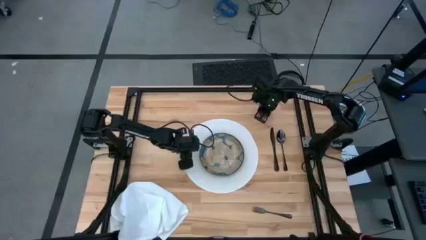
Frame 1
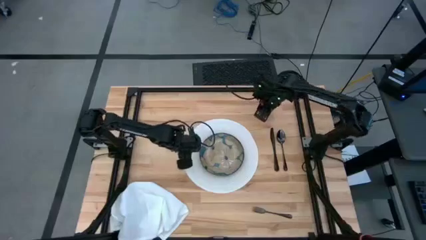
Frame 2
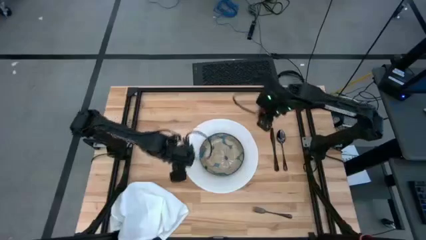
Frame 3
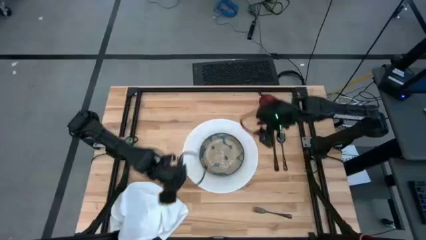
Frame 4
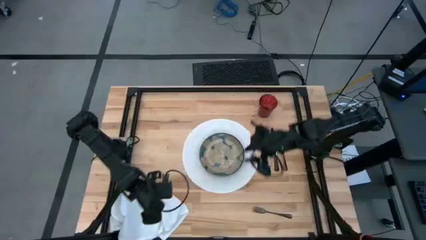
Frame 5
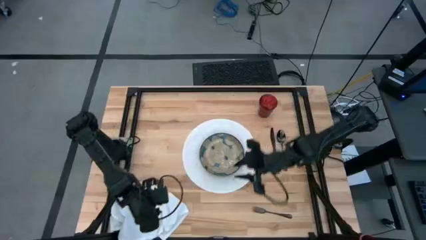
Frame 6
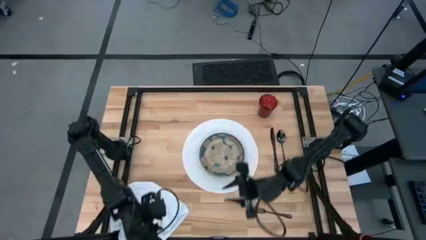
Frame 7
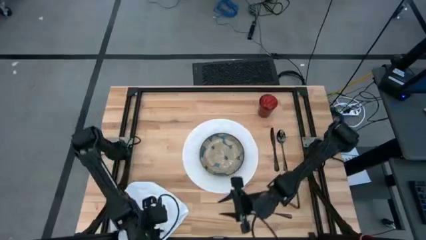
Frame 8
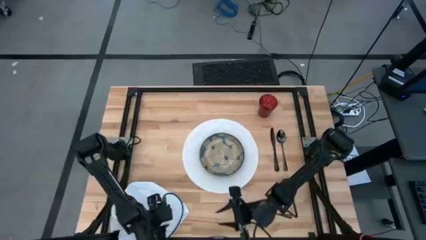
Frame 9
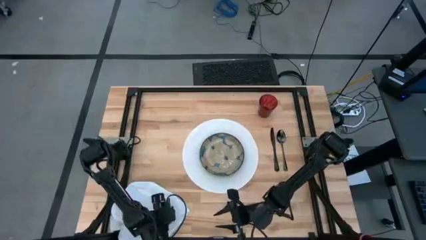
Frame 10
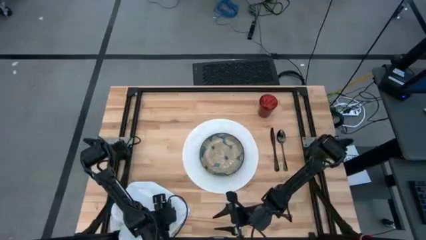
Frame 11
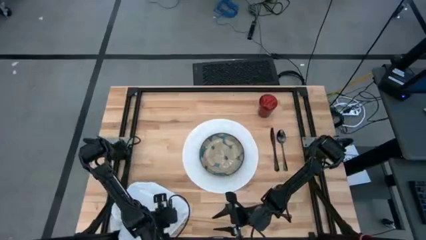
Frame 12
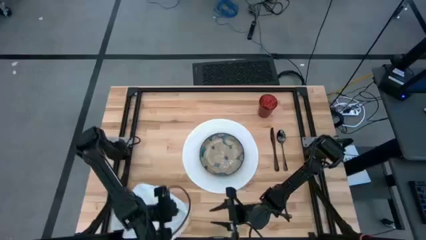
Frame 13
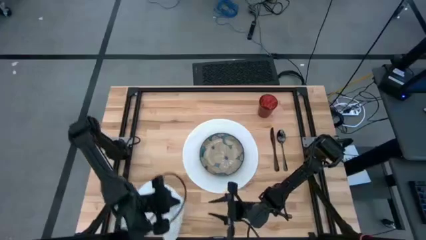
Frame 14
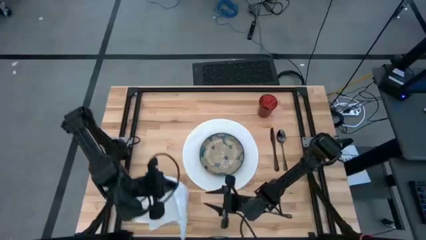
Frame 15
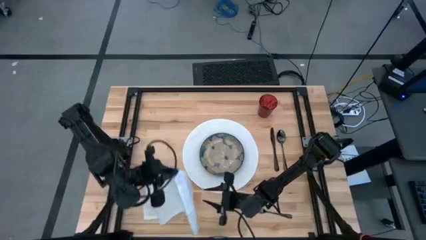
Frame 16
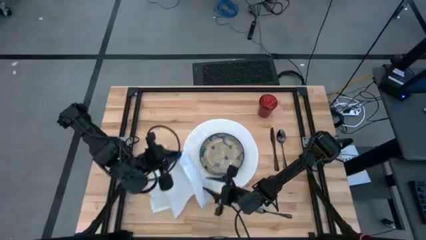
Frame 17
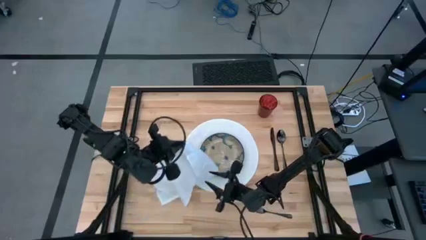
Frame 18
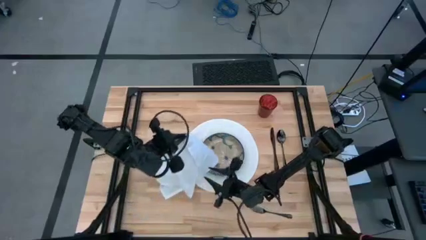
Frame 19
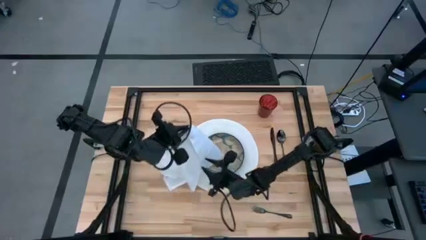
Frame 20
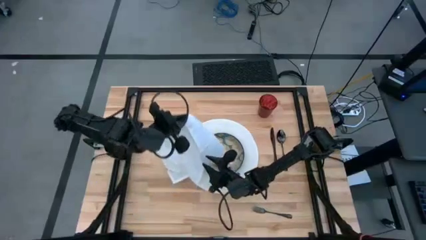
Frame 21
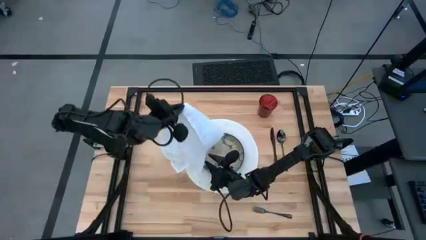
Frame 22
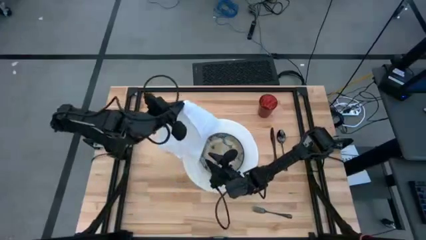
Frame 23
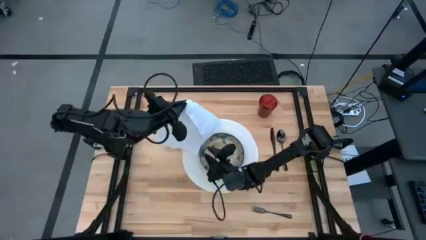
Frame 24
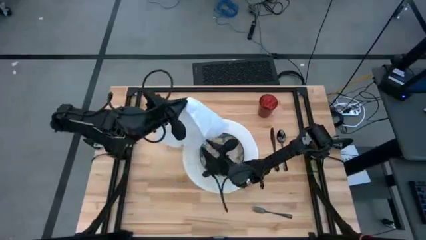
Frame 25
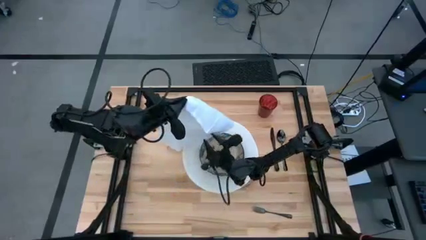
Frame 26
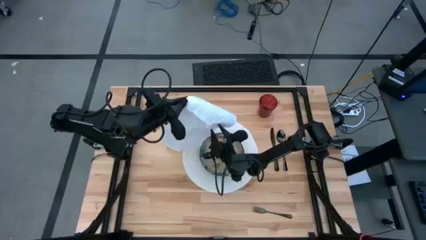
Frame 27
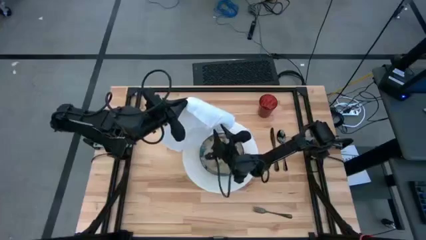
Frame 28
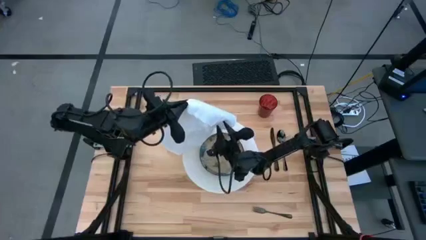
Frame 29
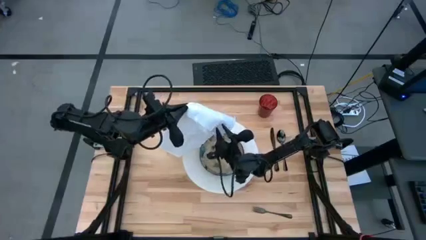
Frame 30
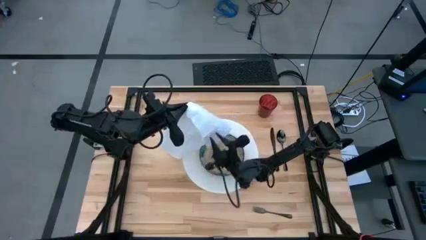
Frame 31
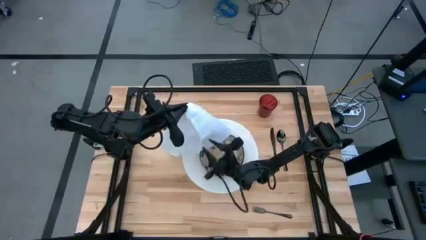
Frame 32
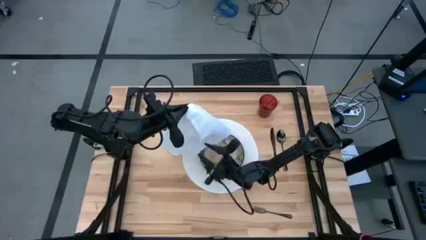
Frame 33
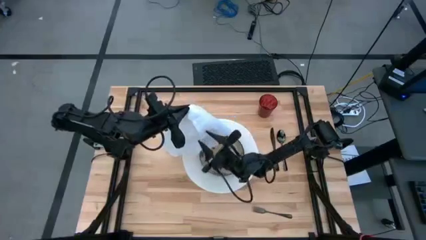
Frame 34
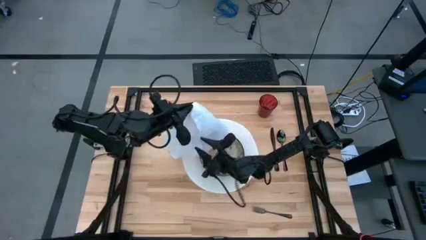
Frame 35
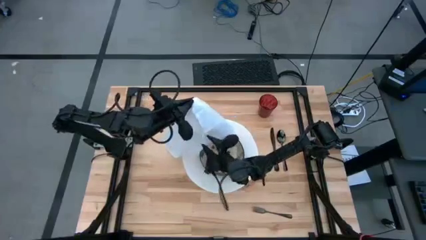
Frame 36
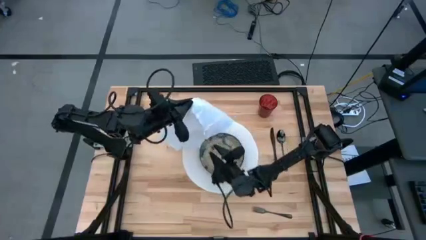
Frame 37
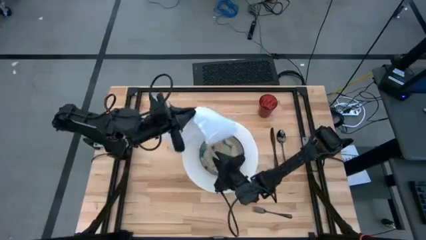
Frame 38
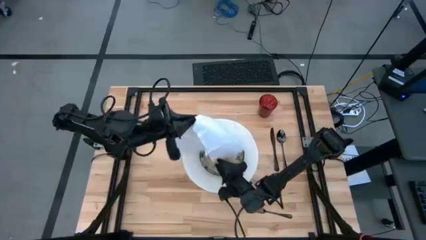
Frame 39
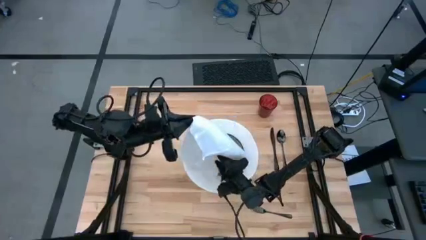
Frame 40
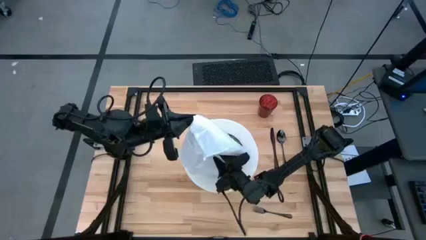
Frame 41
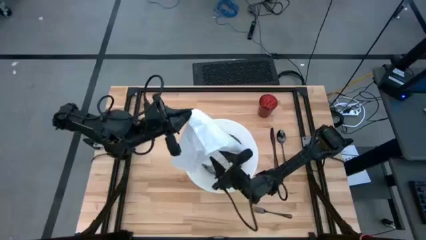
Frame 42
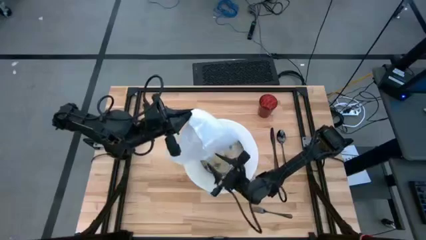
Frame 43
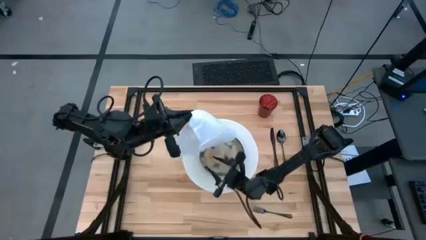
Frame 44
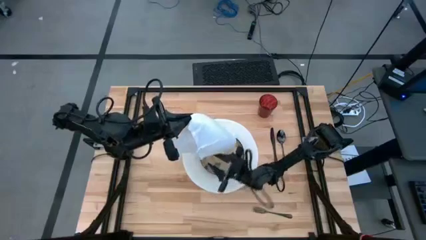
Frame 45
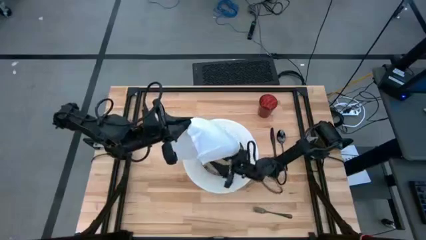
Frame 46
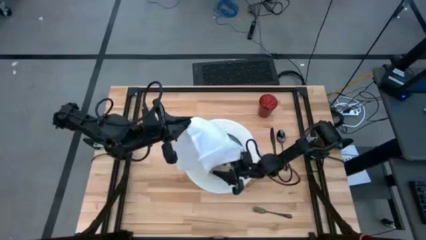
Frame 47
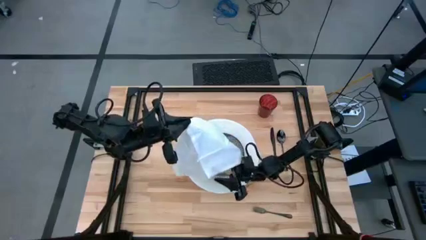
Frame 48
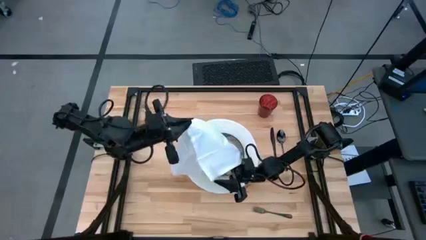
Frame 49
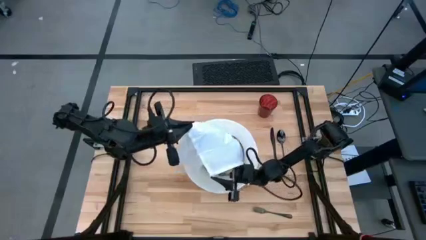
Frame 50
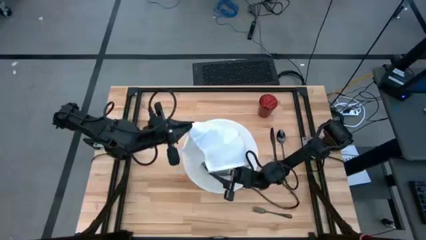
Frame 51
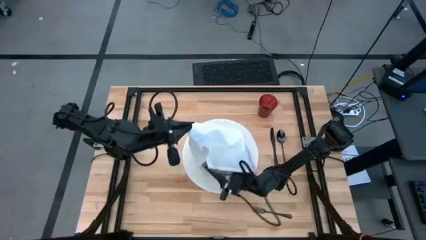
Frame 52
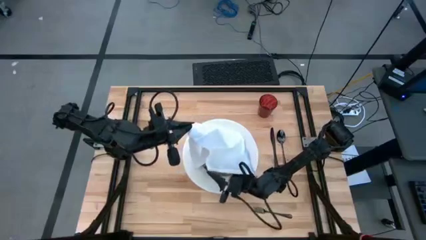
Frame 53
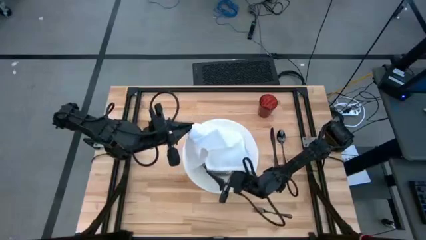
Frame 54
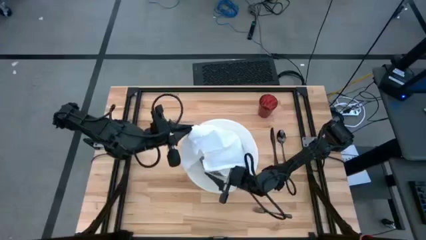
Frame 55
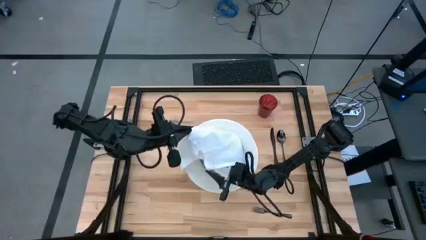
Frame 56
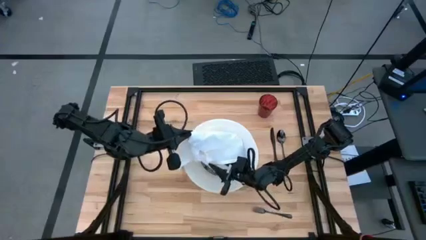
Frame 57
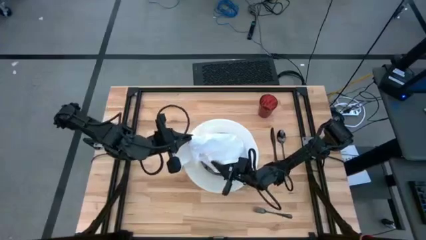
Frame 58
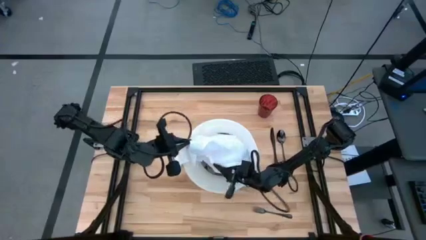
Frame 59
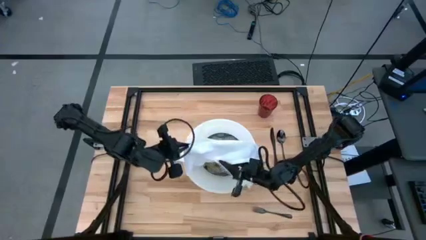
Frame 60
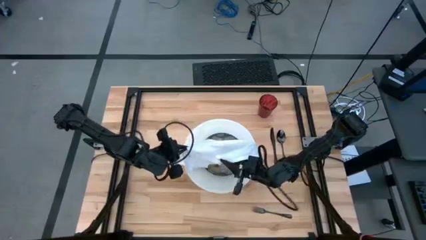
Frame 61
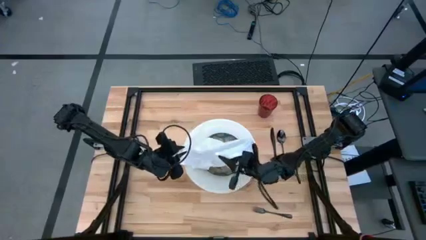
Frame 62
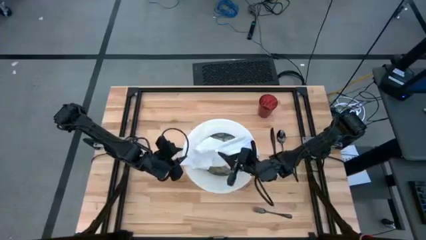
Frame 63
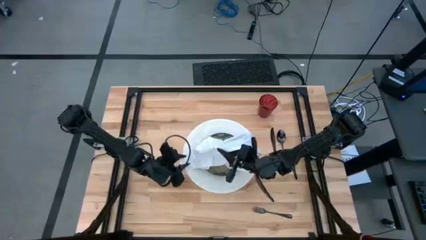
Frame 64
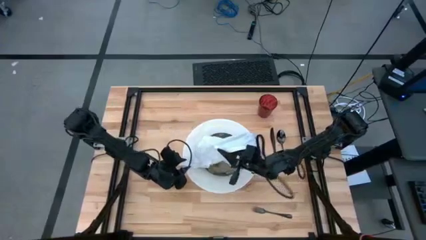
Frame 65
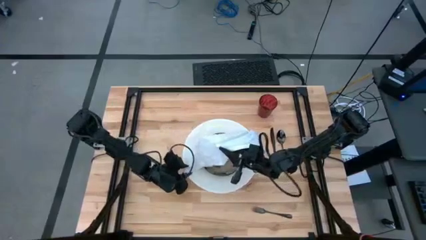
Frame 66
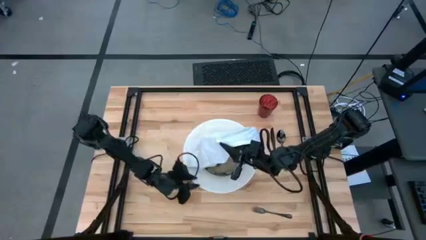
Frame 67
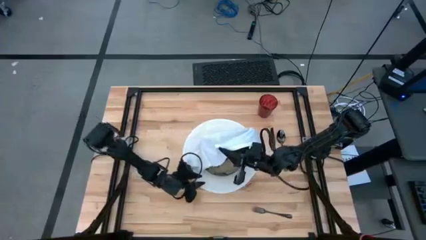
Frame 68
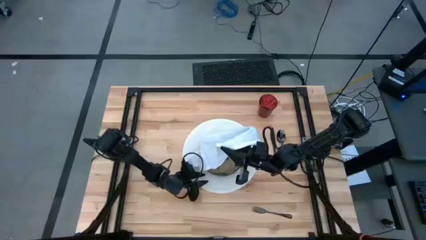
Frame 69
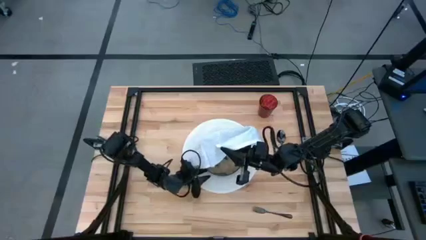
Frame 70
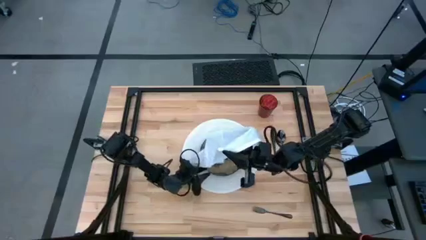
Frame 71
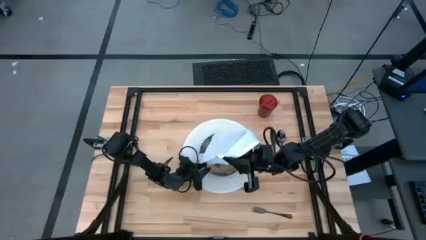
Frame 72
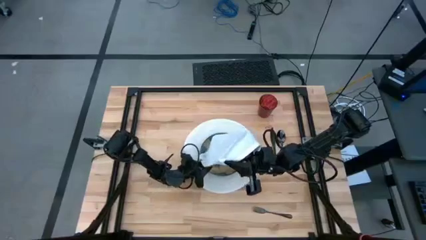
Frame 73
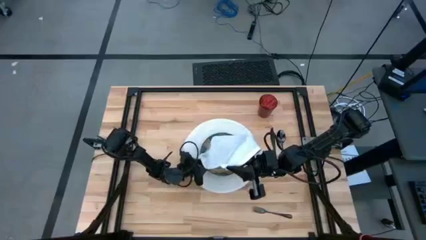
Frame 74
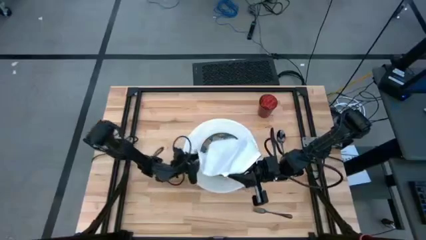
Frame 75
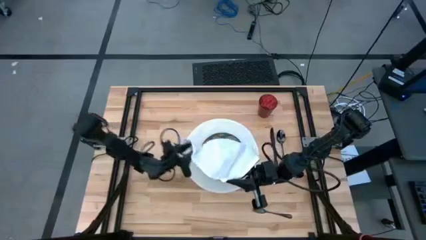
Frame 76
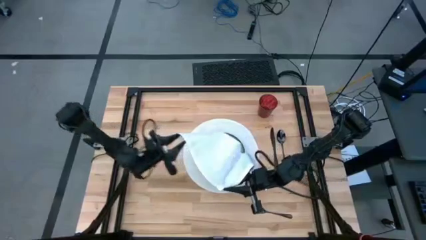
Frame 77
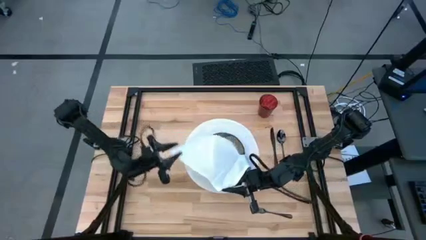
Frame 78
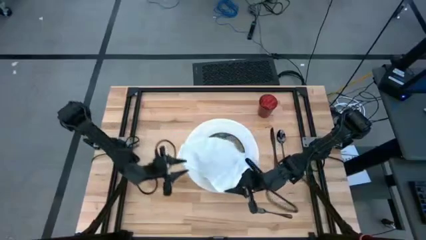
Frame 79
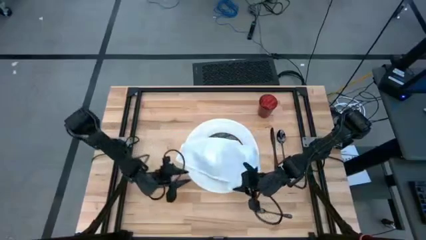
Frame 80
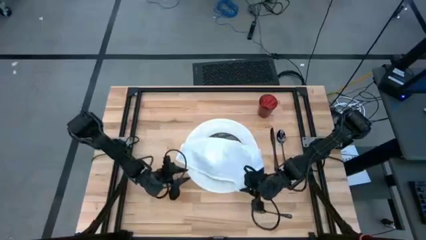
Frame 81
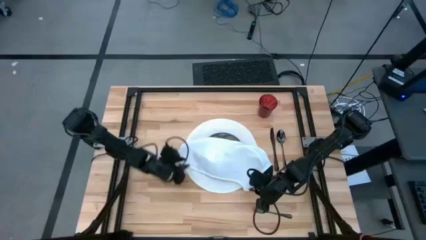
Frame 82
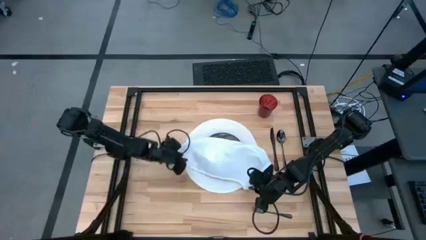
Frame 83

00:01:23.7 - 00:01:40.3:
Task: Set table place
Fold the white table napkin

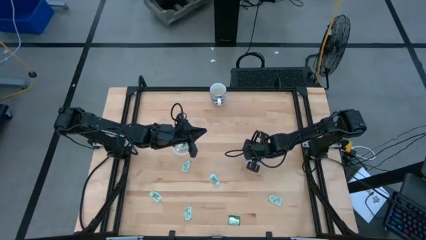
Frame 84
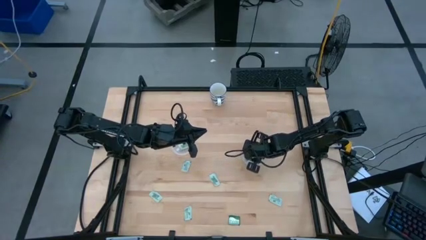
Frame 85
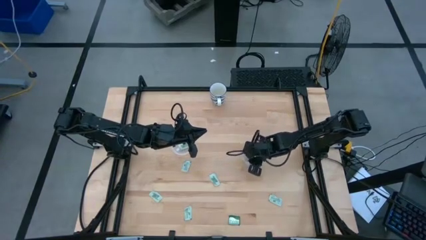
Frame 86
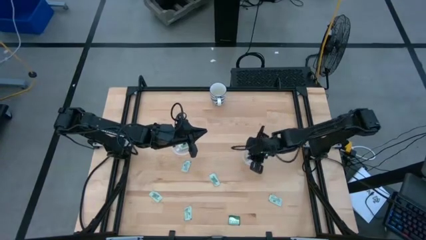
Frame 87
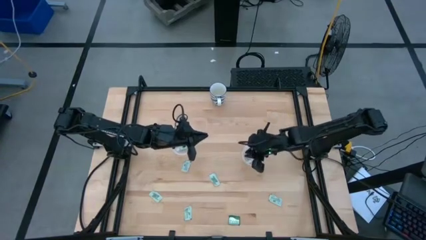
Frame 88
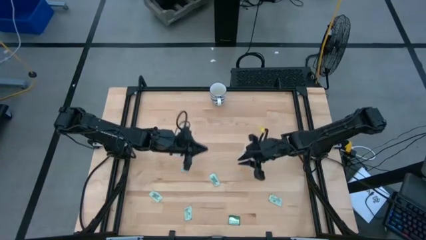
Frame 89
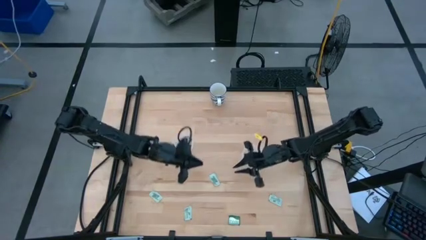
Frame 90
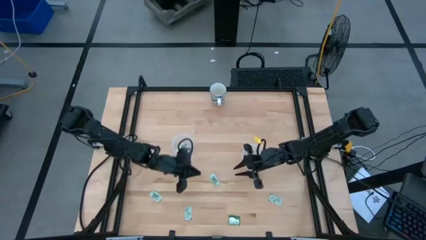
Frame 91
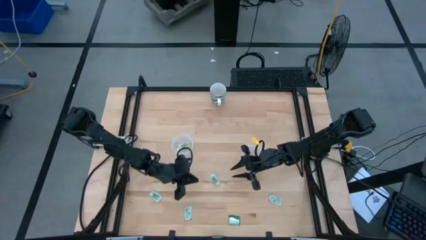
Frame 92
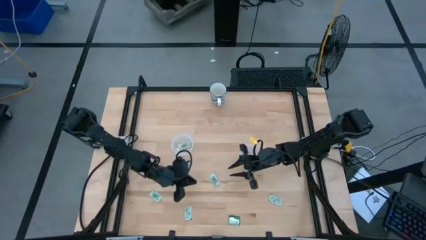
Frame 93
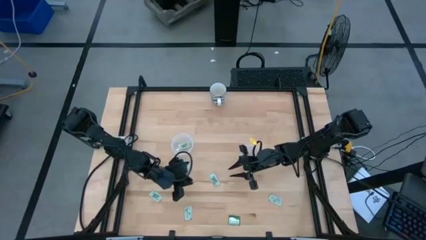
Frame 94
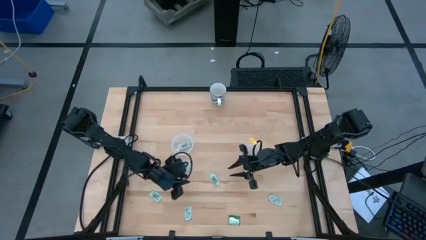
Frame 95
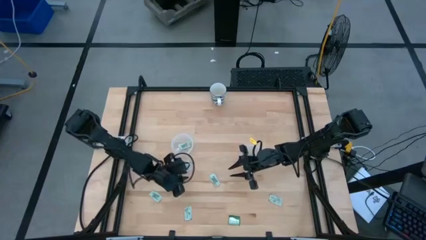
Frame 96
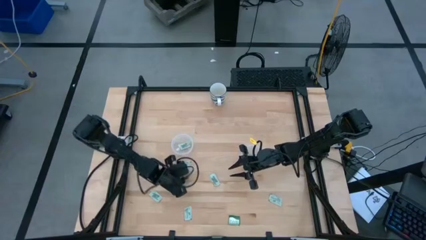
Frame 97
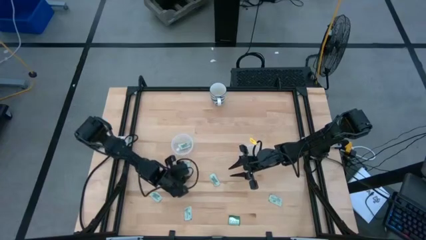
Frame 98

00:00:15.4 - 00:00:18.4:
Task: Pick and place Stevia / Truvia into bins
Put the light green stevia packet into the left transparent container
